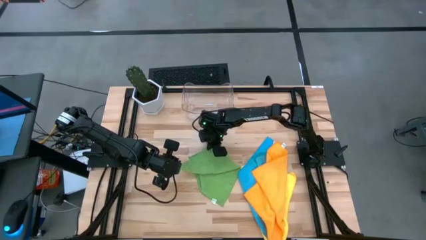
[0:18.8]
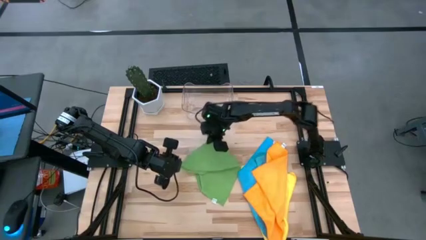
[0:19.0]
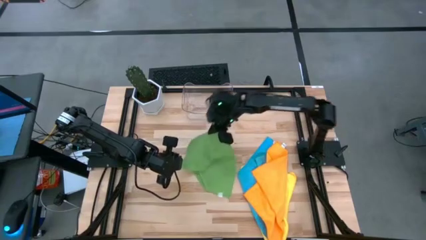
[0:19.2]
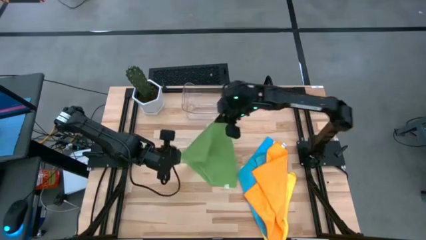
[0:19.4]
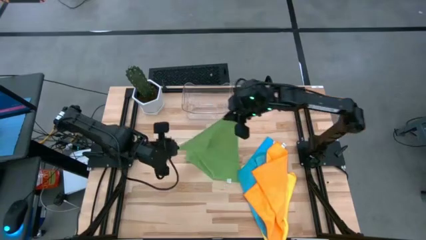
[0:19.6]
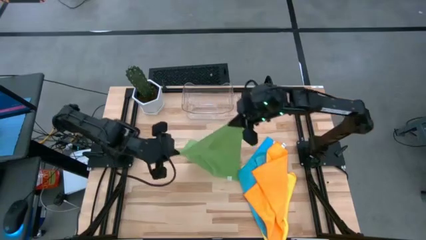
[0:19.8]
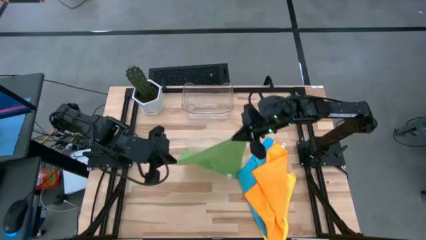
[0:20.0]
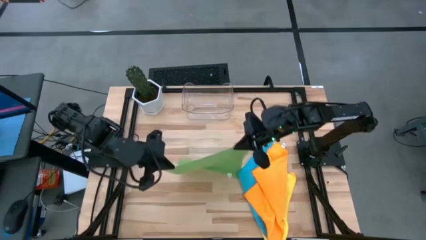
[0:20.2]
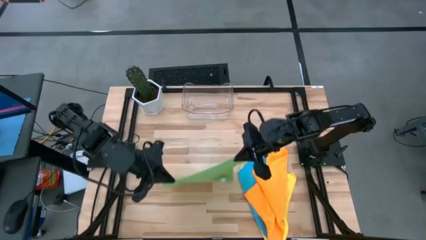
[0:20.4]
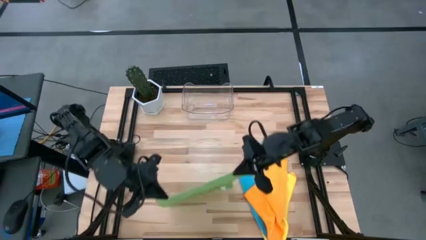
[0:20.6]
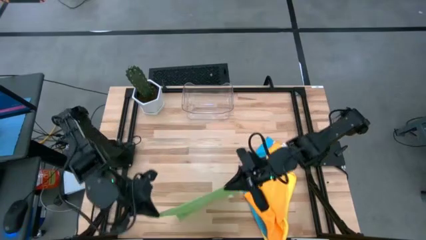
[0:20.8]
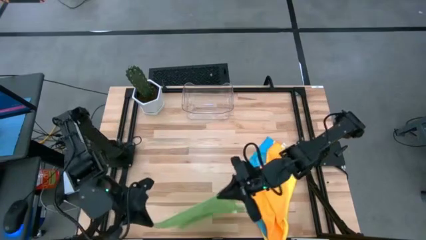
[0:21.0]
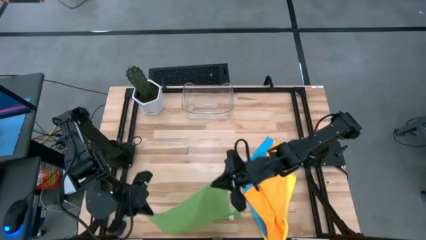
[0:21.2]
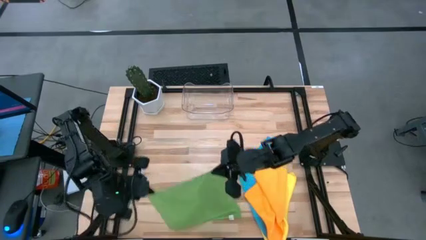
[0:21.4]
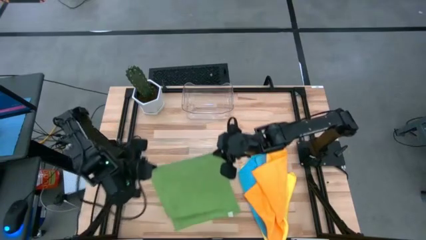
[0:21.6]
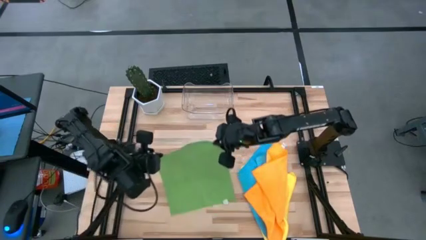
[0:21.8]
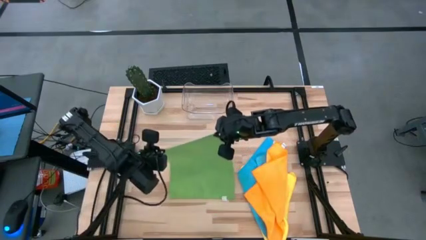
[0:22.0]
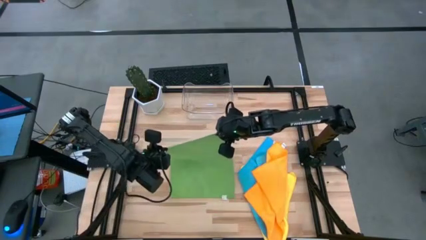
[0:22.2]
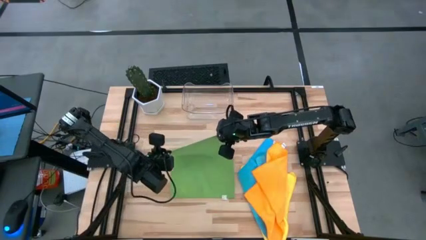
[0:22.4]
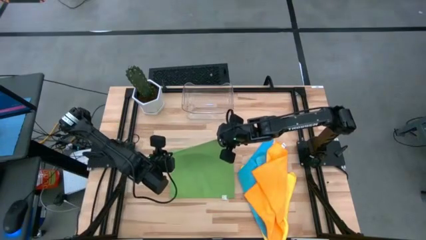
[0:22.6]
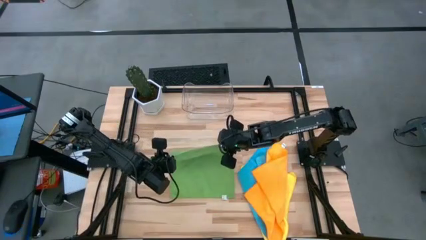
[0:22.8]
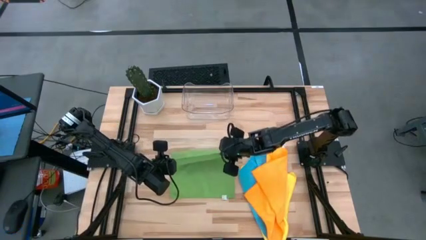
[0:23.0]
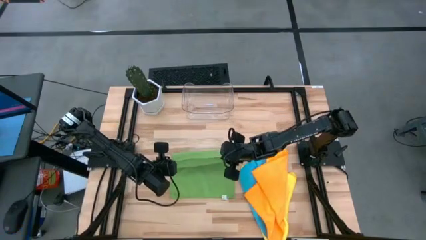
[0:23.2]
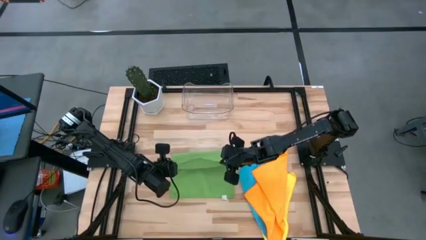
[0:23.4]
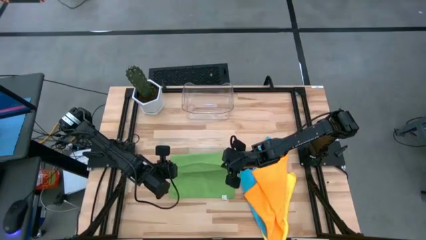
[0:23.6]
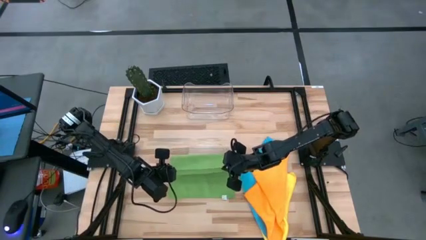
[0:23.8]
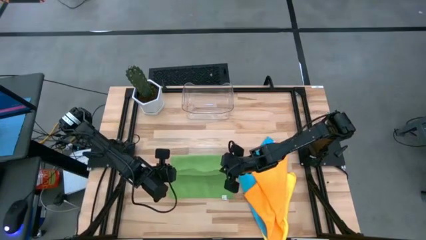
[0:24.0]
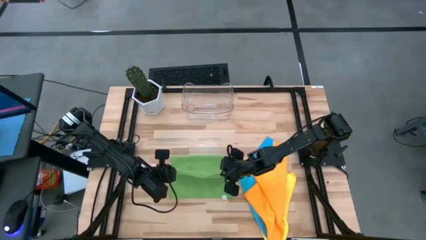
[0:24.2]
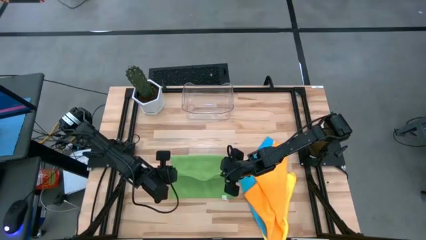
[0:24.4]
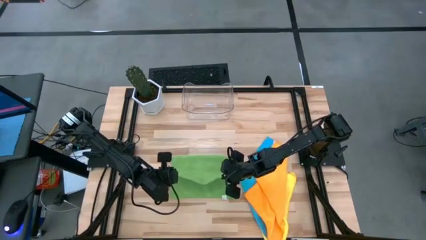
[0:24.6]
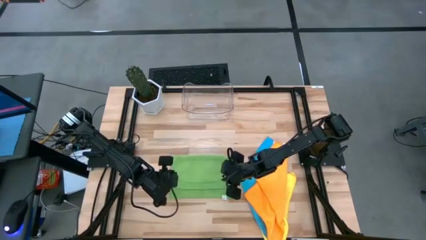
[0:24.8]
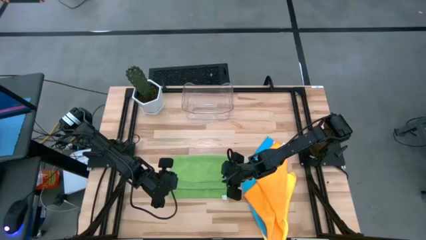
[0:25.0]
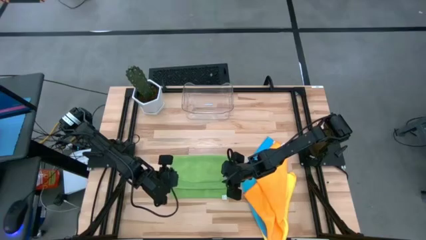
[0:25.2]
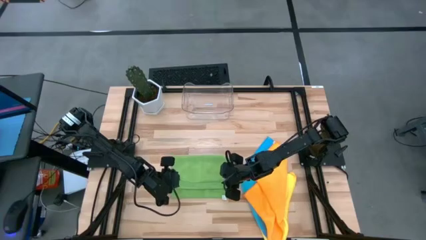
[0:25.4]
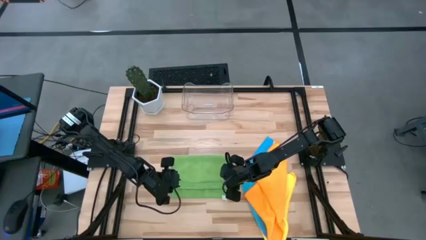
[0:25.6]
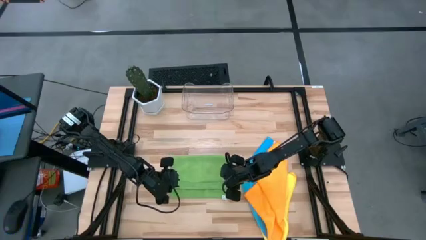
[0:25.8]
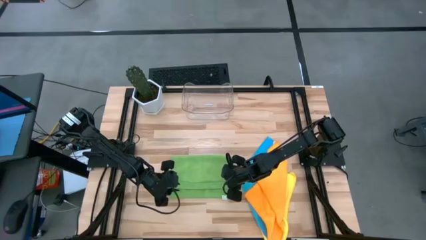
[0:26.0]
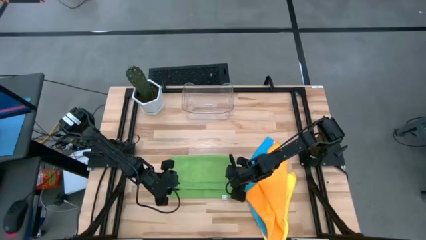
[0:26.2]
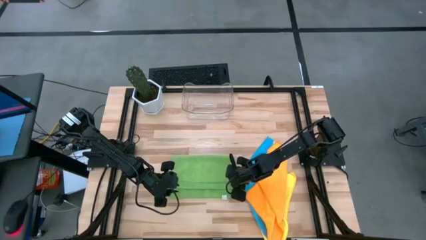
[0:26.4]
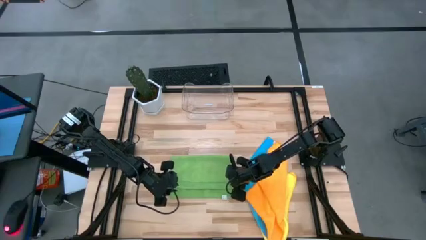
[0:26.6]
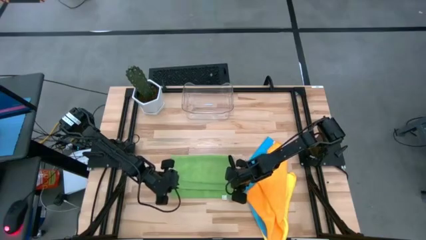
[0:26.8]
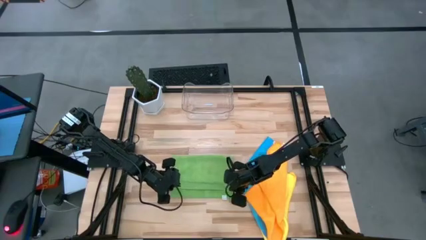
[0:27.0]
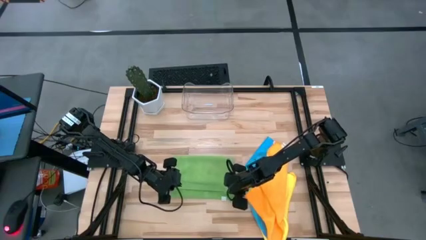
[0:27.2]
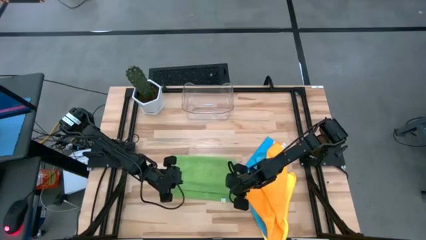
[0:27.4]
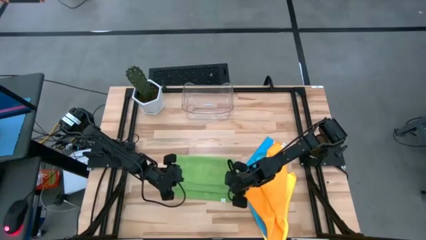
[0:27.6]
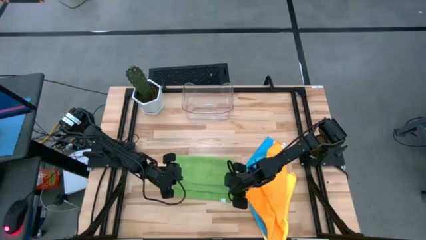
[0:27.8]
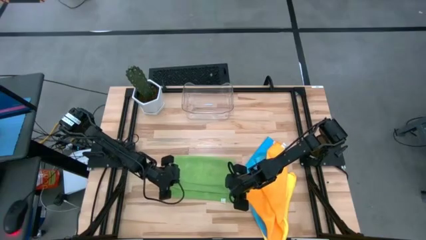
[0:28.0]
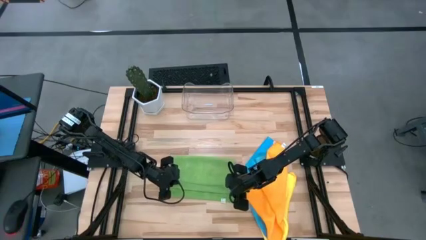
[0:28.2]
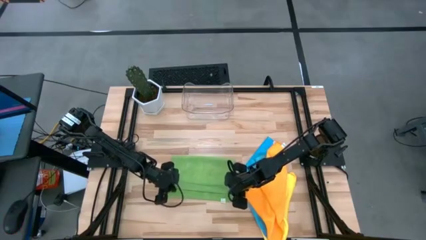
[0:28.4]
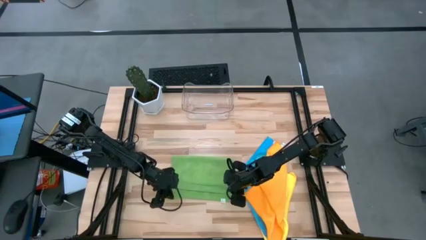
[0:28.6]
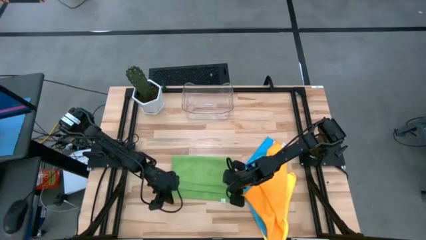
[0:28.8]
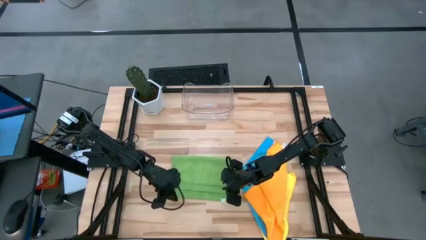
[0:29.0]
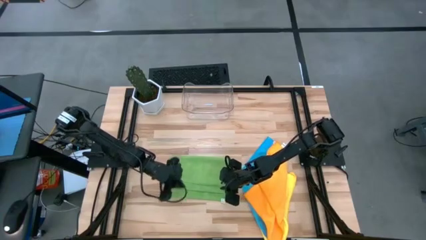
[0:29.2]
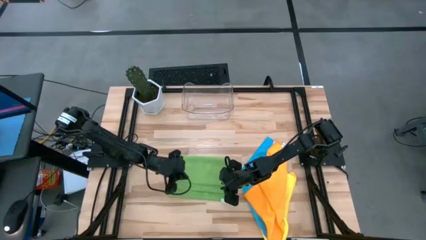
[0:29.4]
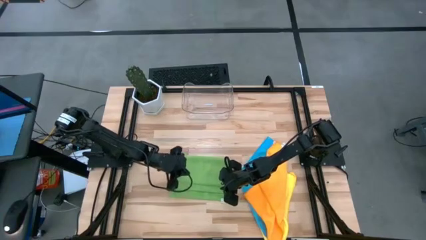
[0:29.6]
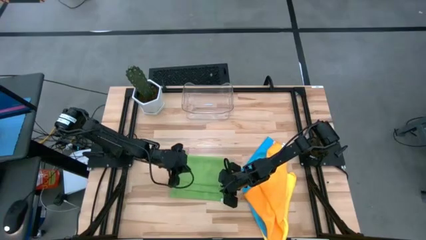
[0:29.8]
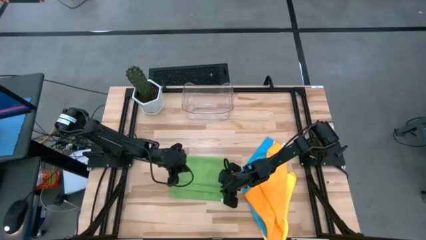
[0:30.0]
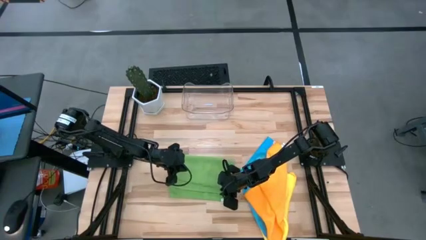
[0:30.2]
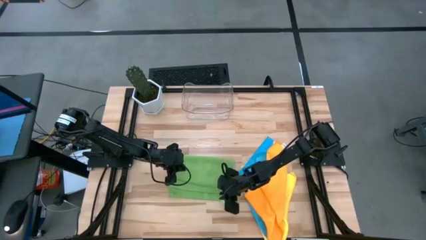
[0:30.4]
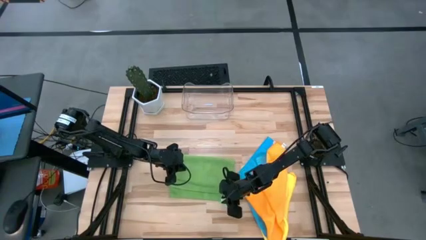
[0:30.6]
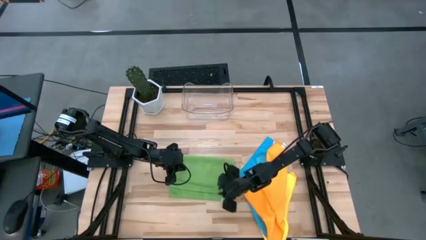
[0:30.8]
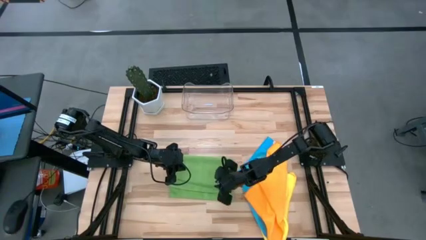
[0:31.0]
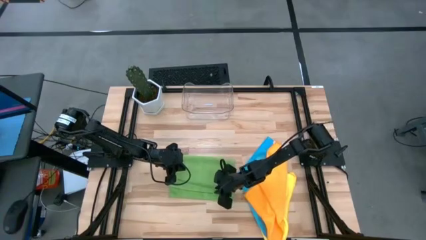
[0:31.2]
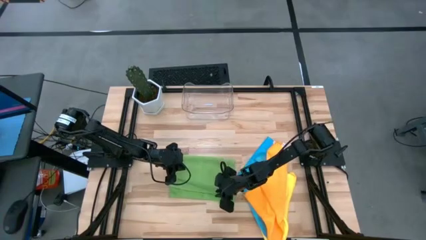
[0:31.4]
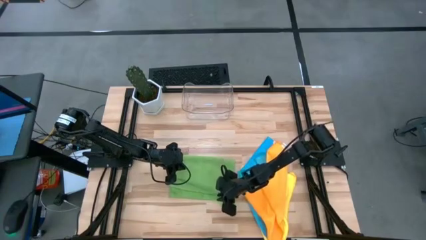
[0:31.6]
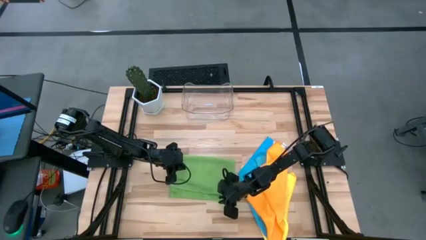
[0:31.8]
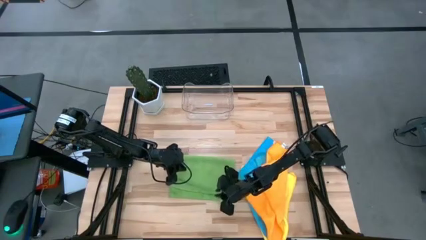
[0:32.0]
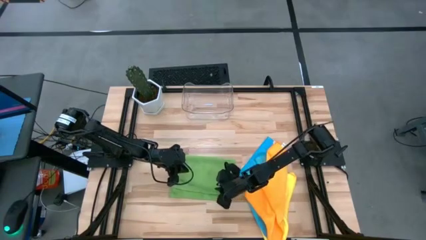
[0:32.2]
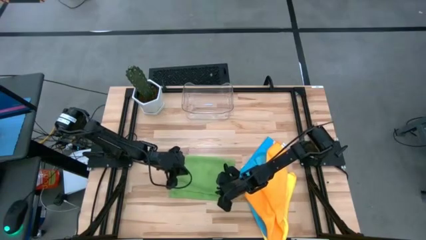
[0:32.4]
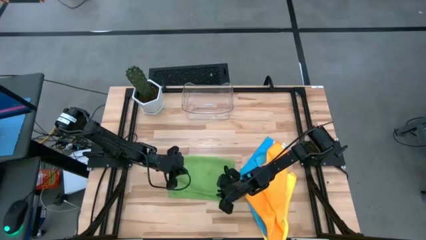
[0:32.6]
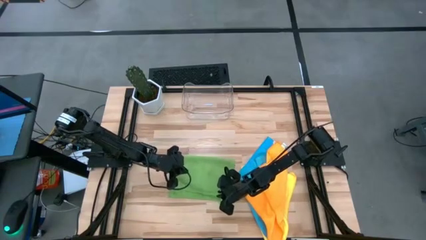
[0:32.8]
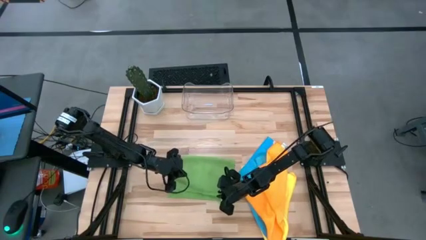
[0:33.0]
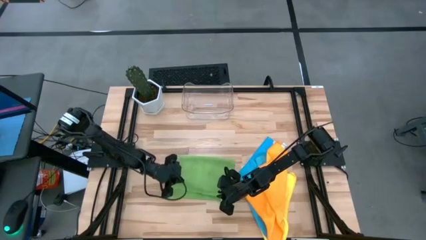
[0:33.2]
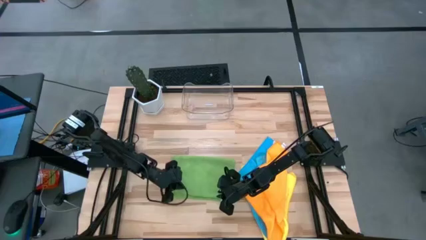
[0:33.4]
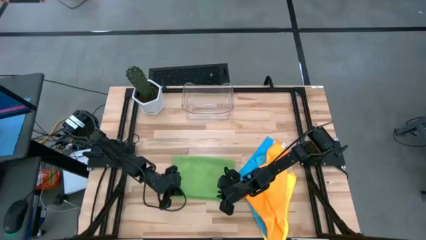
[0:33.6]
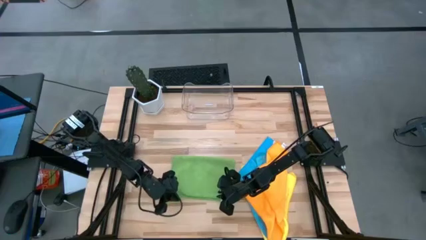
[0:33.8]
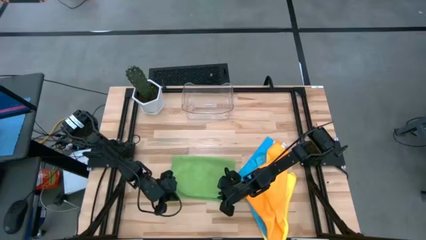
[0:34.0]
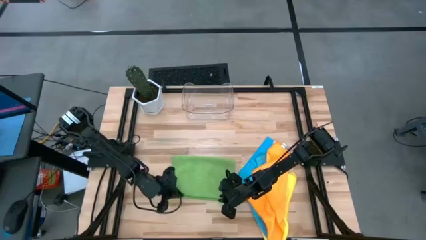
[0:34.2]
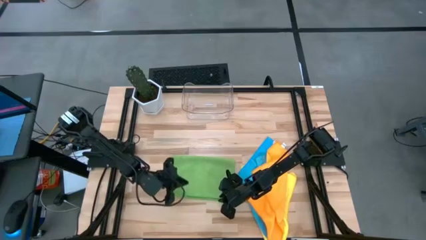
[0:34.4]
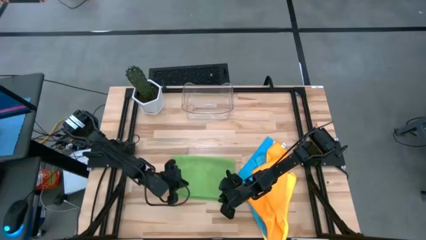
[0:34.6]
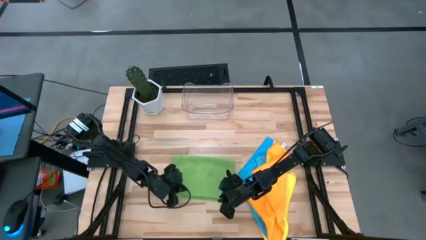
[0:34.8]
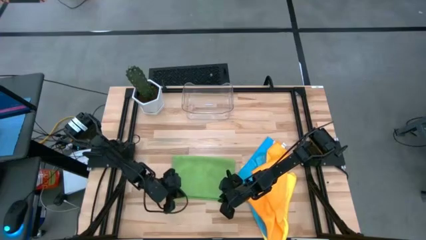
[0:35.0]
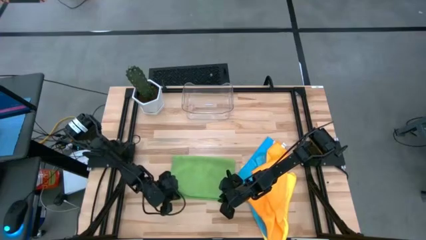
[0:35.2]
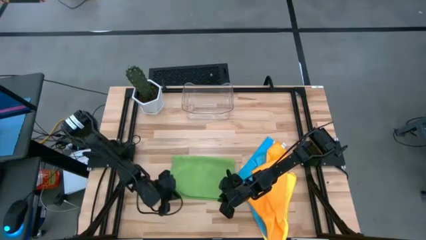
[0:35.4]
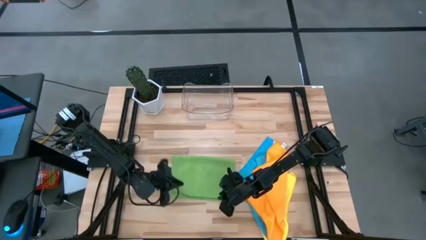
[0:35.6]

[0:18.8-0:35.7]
Task: Fold microfiber towels
Fold the green towel
